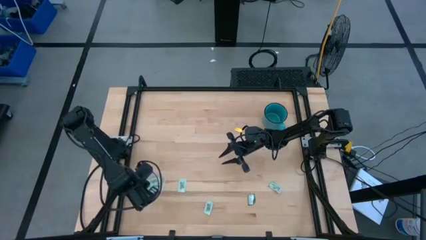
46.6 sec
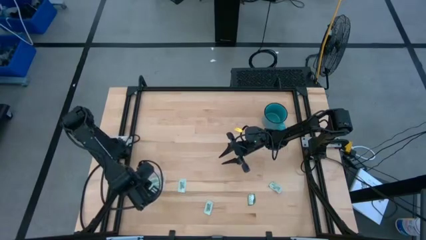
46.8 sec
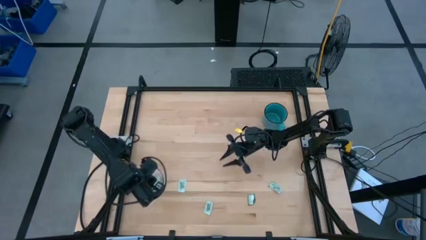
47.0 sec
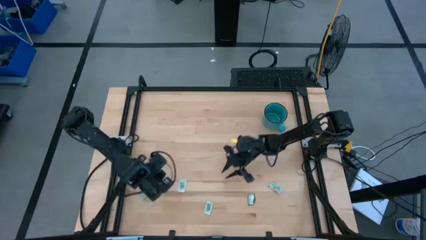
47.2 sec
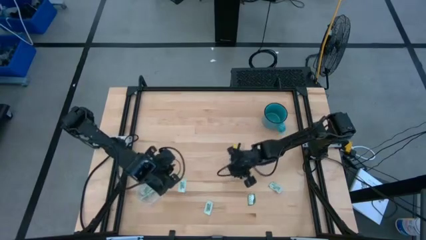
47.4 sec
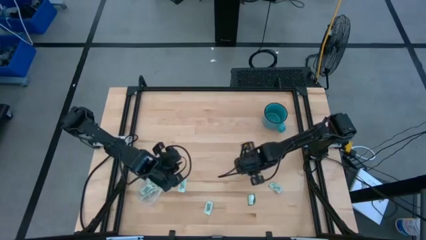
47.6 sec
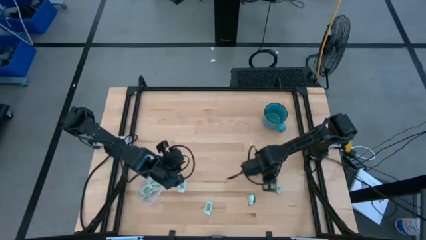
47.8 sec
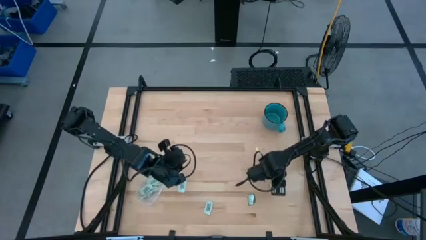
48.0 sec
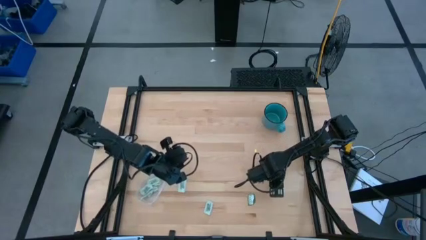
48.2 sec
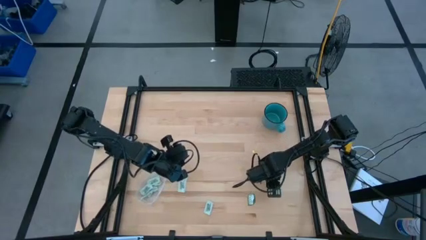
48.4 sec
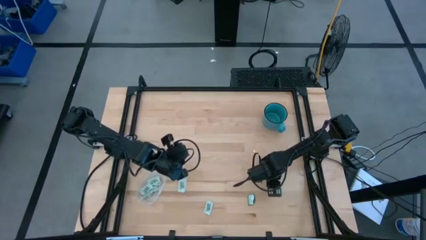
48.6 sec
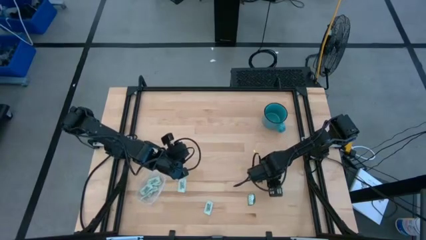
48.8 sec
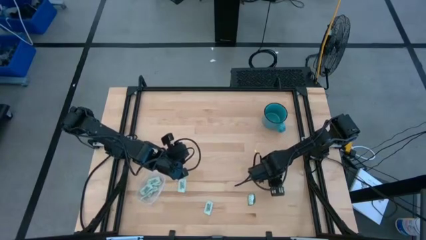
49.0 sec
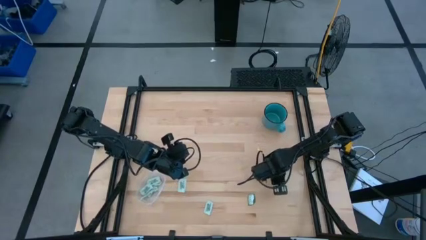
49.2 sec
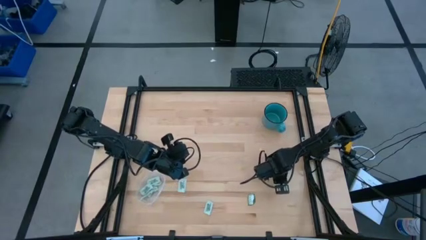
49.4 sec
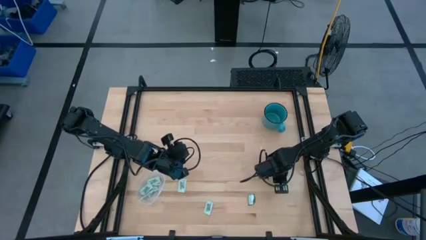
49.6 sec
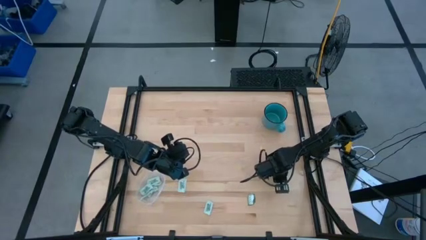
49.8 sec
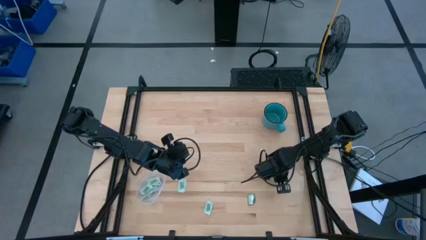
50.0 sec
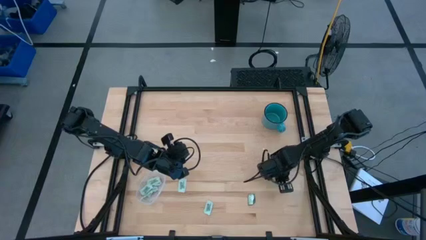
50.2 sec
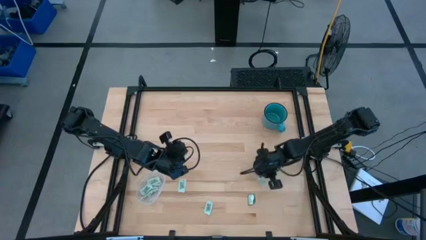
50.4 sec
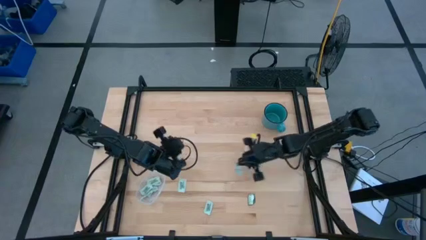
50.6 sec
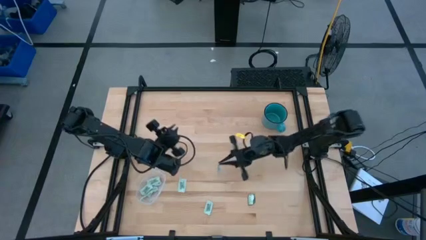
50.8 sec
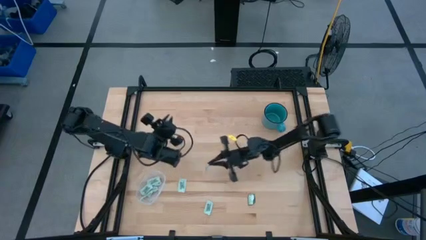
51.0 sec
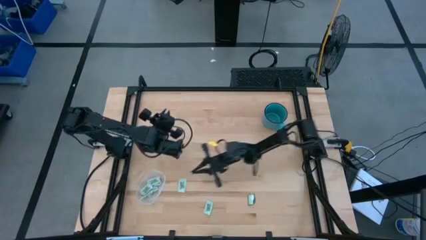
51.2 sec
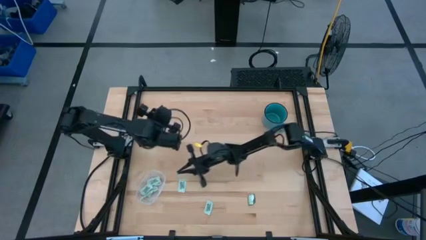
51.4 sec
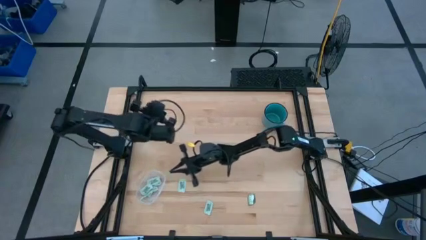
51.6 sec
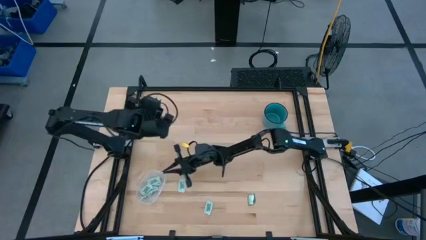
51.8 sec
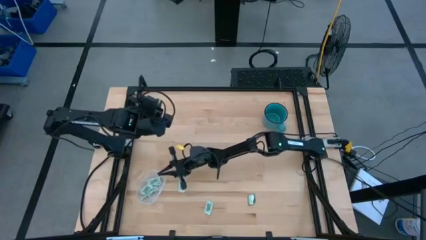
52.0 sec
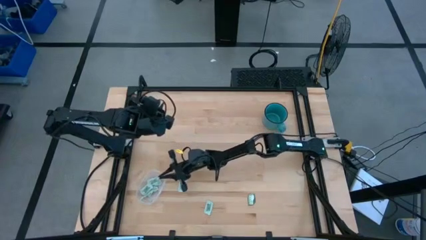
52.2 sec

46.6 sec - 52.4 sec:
Task: Pick and place Stevia / Truvia into bins
Put the top right white stevia packet into the transparent bin

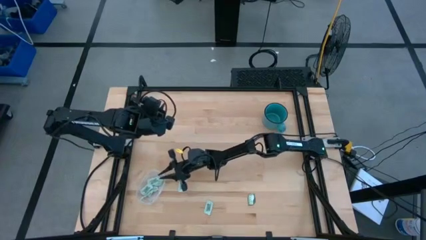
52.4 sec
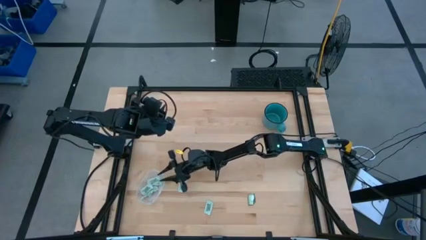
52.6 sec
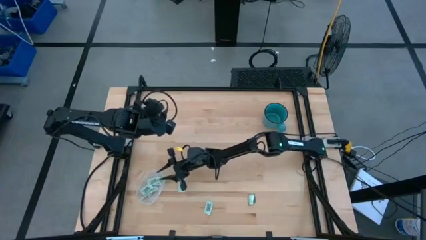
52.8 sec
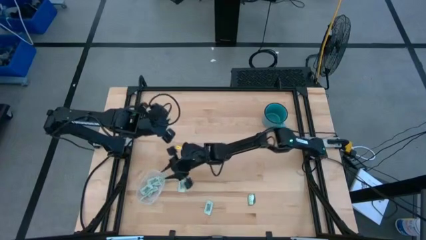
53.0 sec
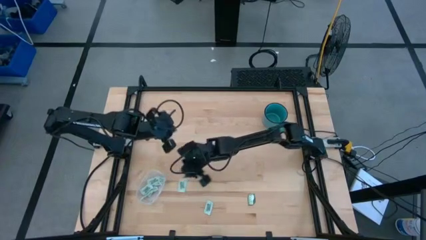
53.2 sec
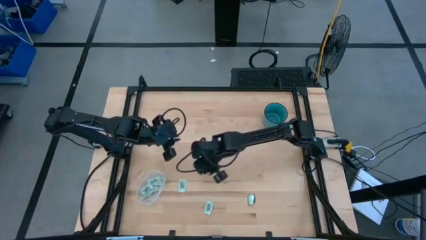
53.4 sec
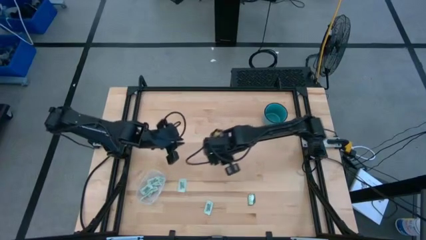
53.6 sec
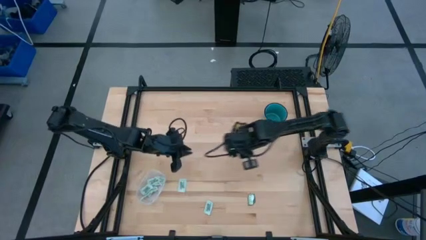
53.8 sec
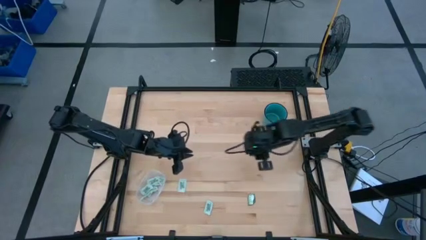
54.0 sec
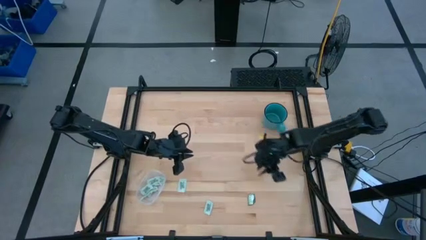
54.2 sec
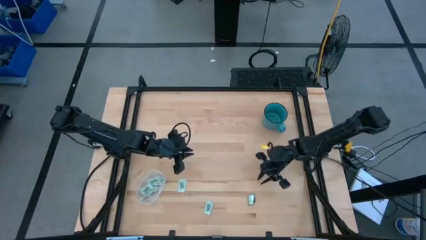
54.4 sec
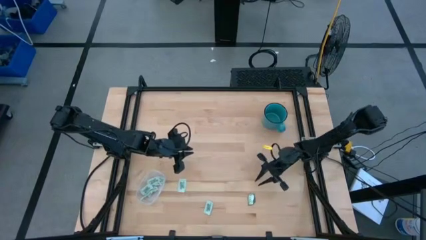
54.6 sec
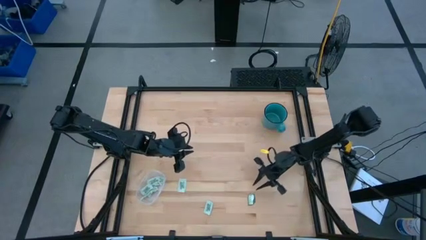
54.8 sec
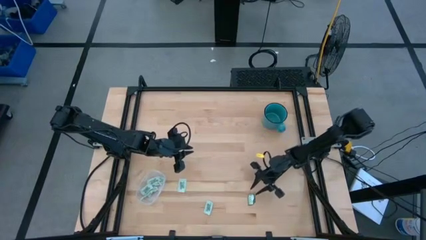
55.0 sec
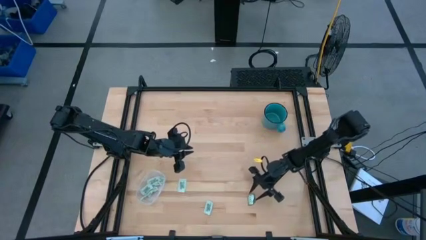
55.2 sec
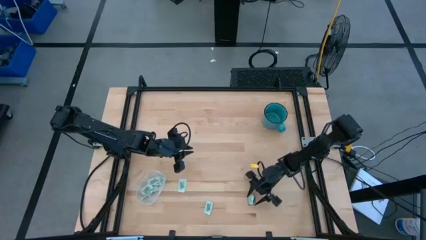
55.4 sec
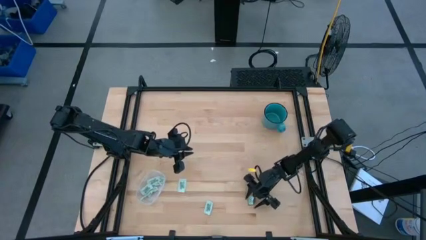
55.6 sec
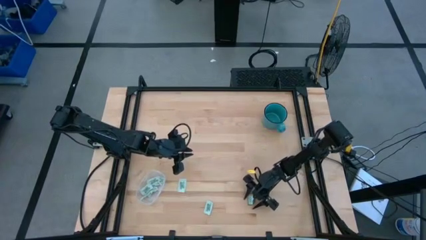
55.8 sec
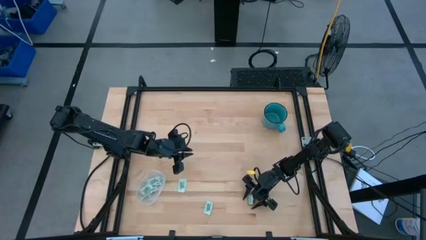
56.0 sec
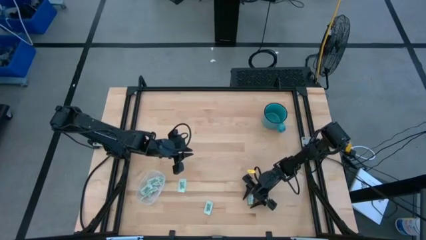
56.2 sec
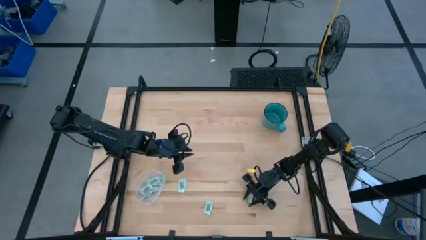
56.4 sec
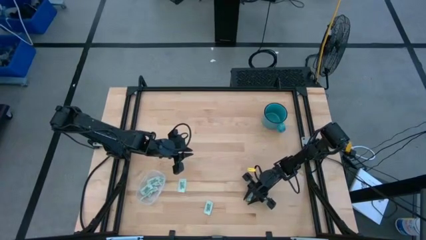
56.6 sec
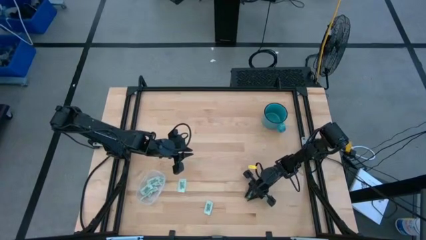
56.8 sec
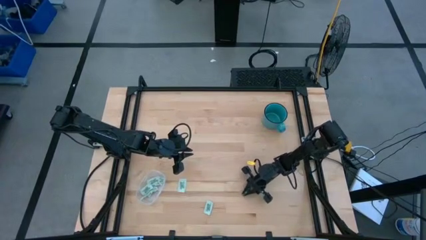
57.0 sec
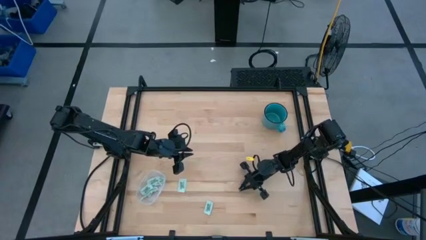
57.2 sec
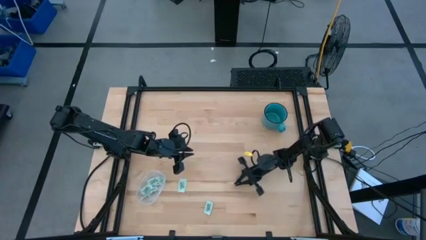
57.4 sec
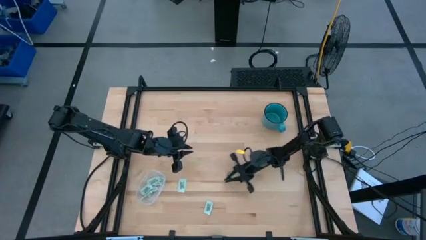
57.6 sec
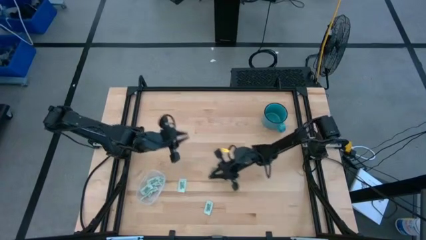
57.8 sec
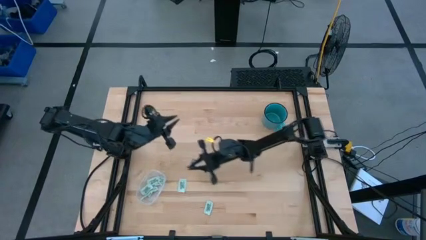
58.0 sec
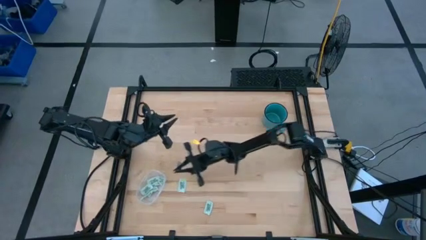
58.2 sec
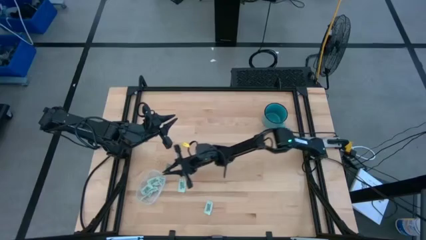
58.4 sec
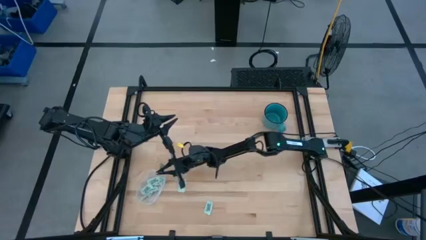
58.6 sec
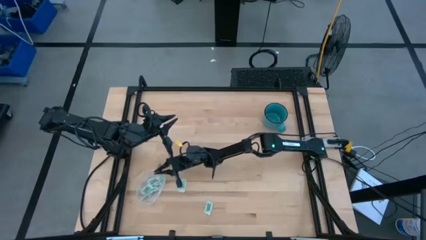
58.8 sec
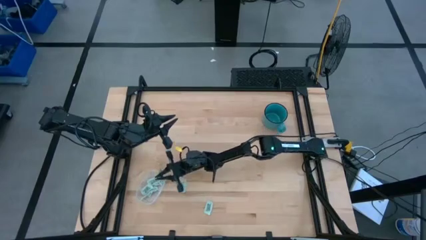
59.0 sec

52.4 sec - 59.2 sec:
Put the green stevia packet into the transparent bin

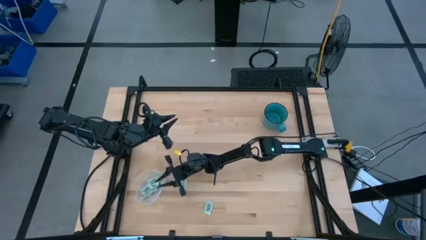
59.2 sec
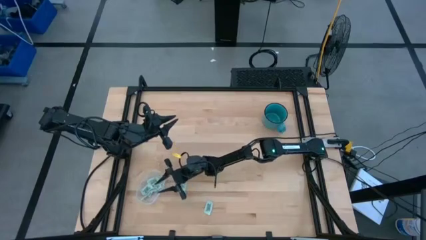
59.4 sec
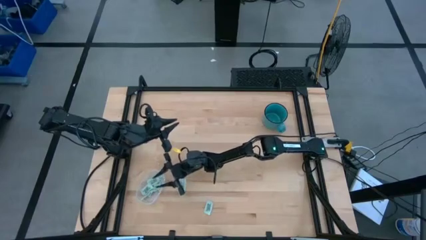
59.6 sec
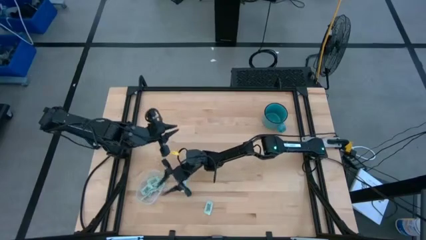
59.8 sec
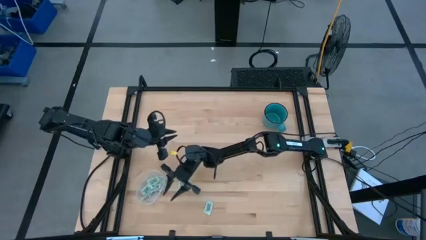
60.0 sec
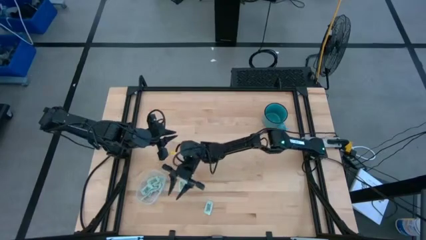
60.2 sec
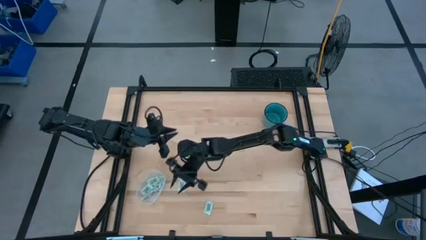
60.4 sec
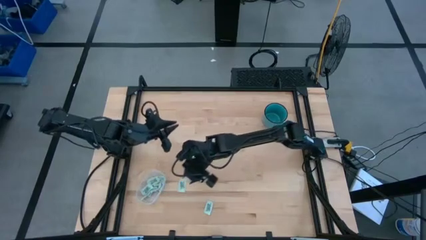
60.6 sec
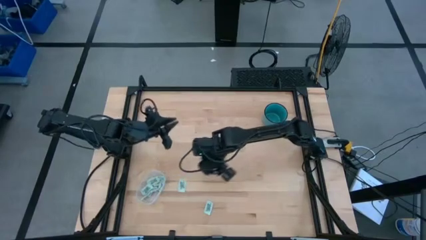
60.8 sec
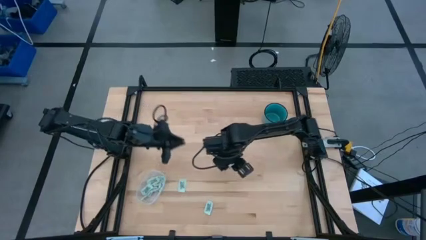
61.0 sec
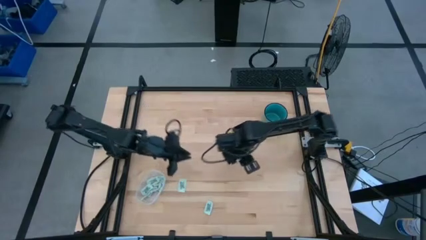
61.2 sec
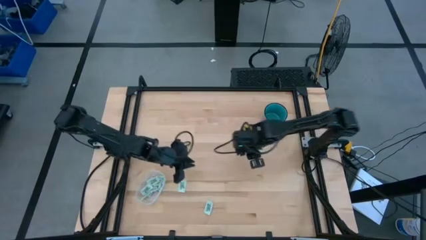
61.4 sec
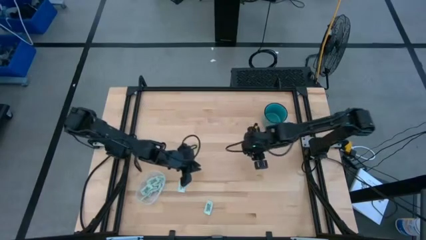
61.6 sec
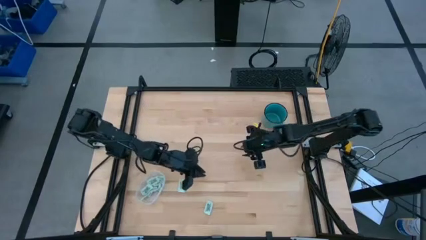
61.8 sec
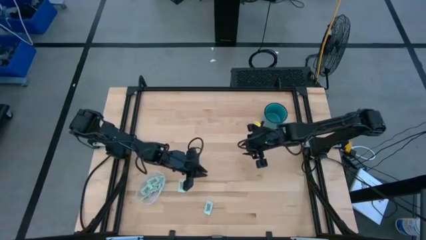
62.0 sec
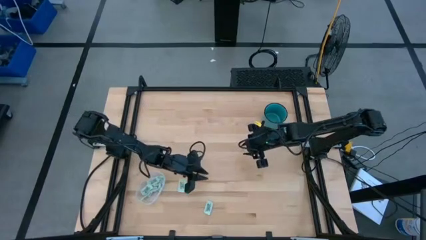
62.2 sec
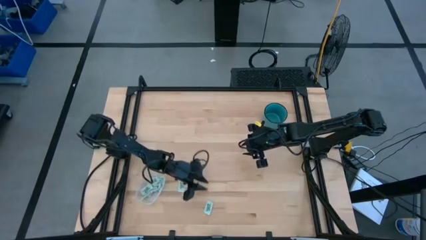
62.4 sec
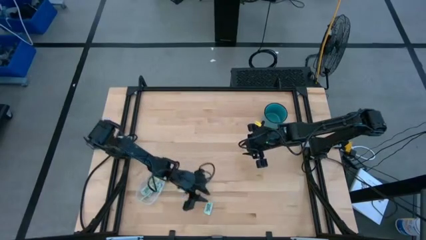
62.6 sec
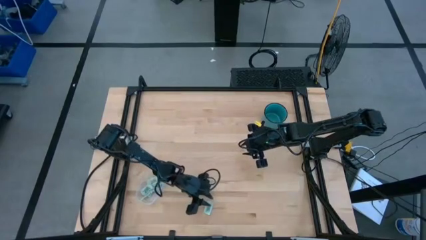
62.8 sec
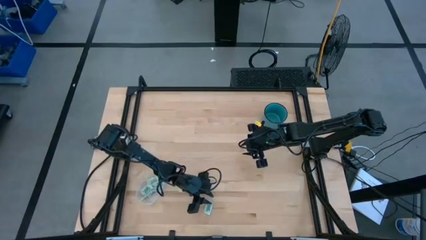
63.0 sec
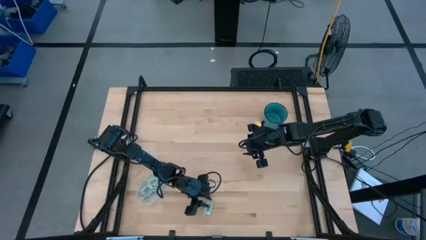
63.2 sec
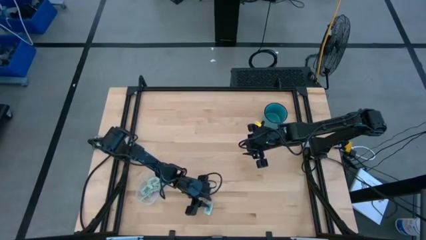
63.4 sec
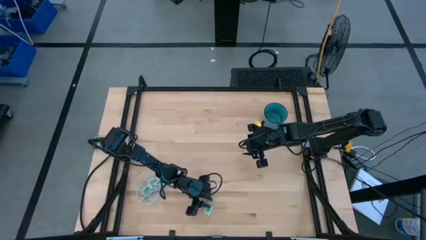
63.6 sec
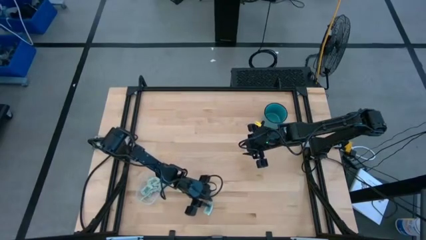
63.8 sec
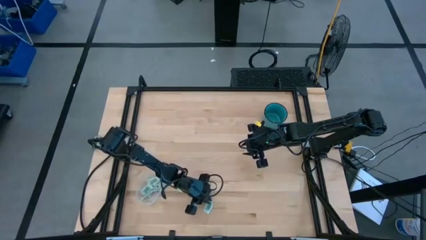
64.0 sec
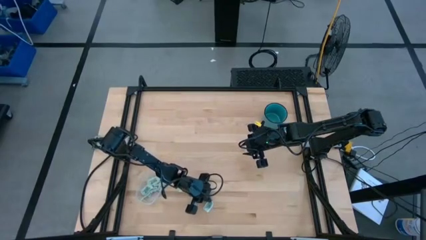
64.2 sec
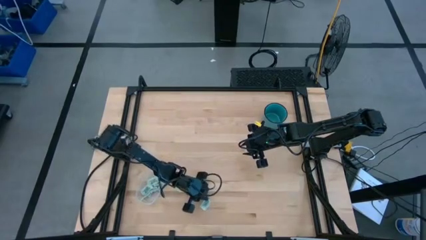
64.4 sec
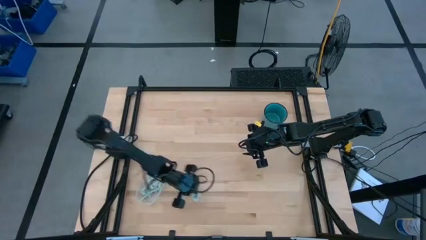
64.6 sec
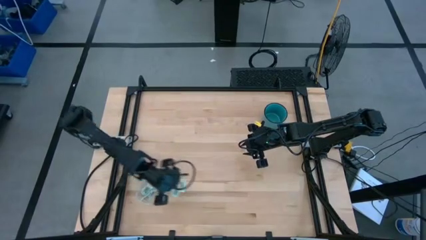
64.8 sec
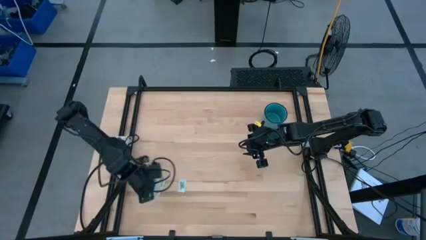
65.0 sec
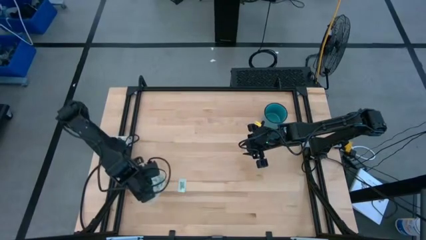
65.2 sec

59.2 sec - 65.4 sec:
Put the bottom white stevia packet into the transparent bin
